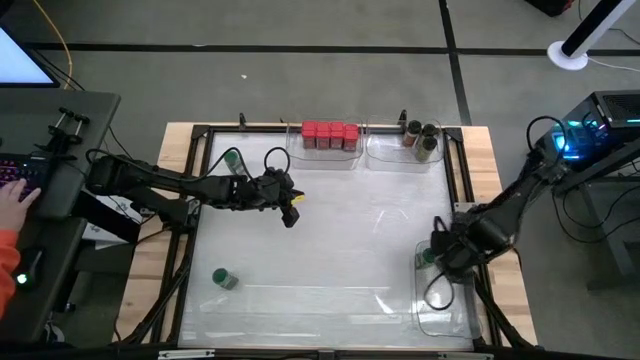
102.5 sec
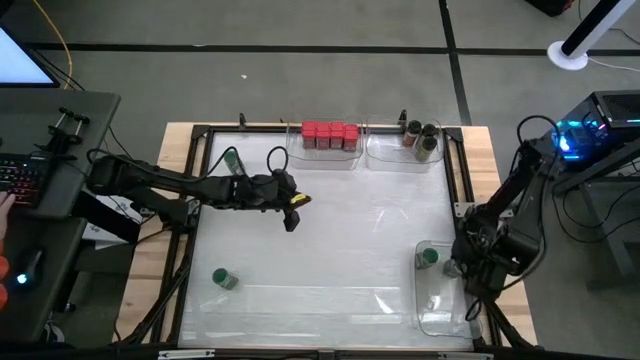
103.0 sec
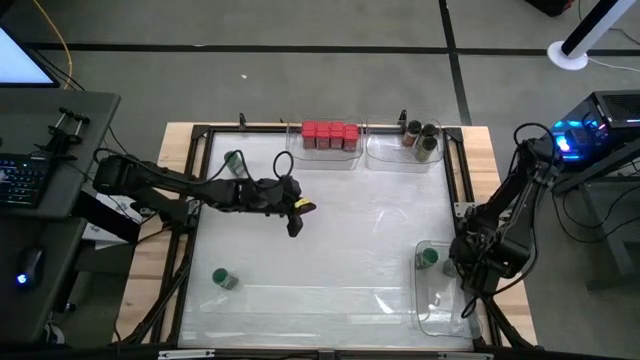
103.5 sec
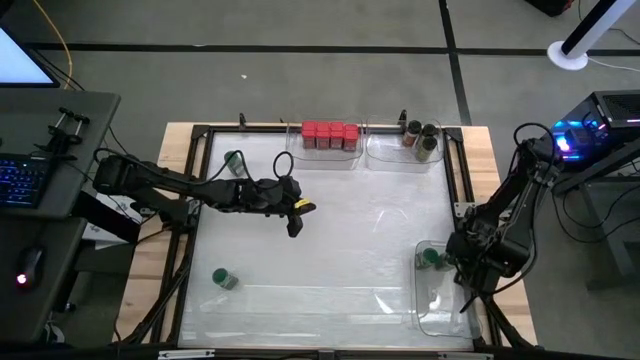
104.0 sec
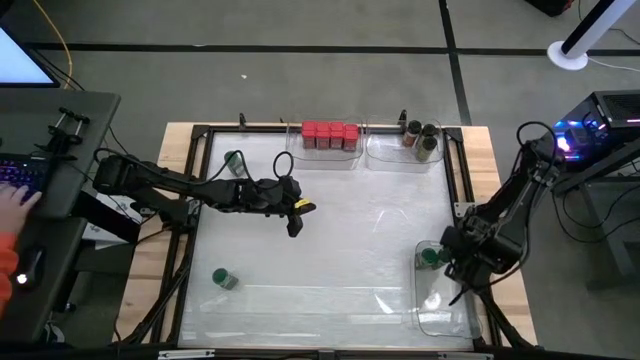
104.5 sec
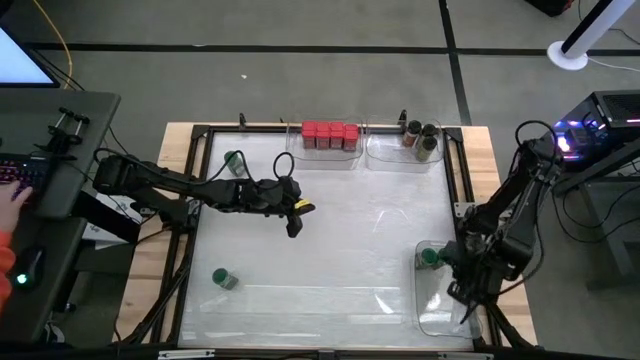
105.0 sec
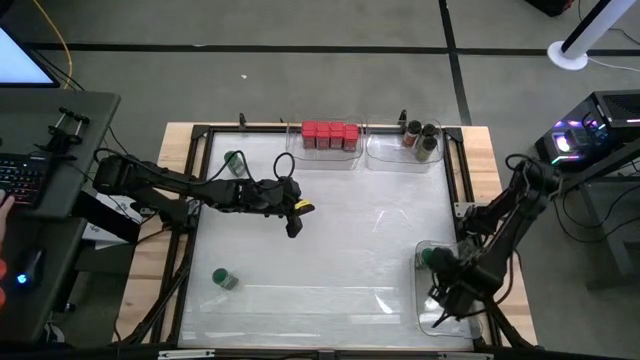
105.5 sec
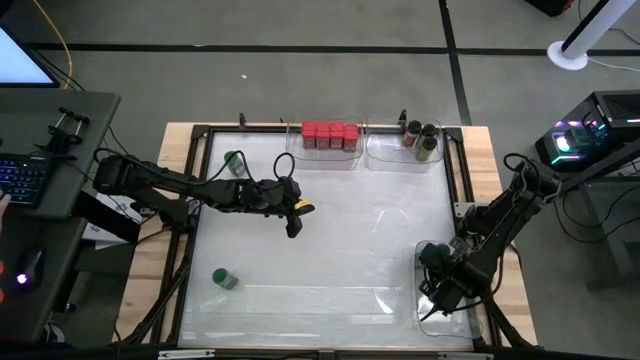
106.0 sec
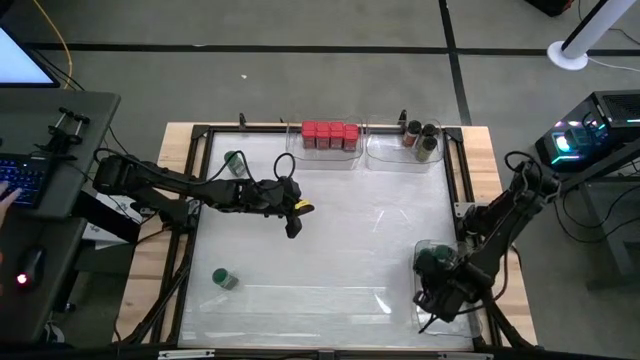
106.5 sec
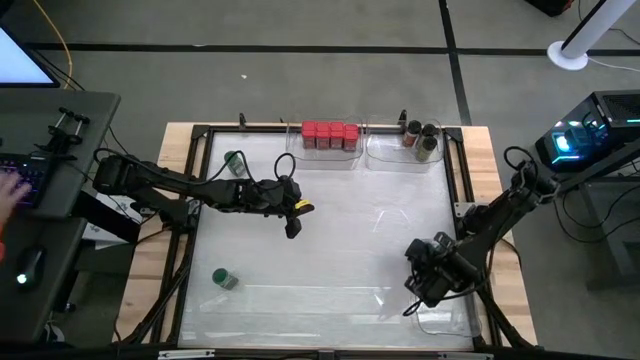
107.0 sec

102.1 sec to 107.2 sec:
Task: Sort spices by type
Adjust the green seasoning bottles inside the bottom transparent bin

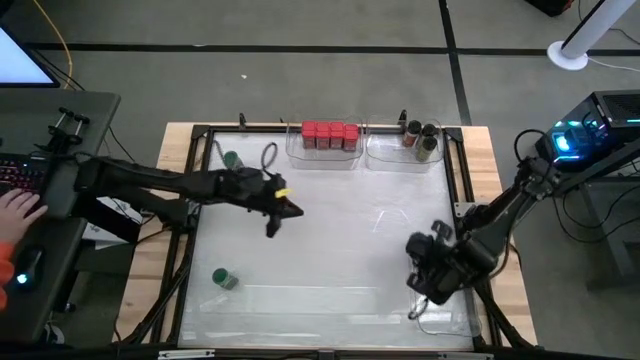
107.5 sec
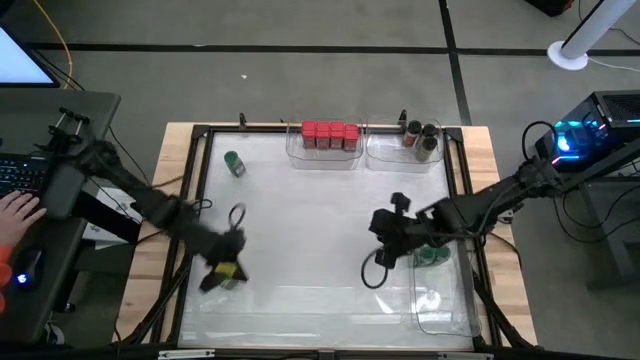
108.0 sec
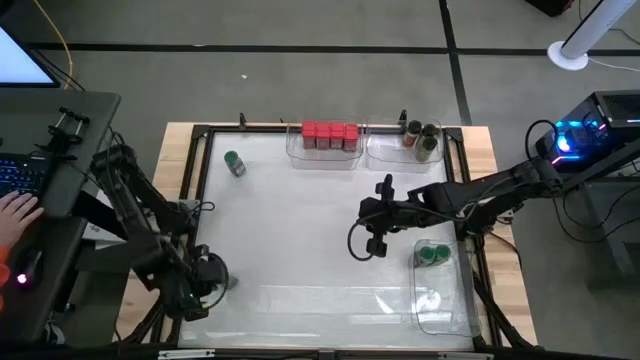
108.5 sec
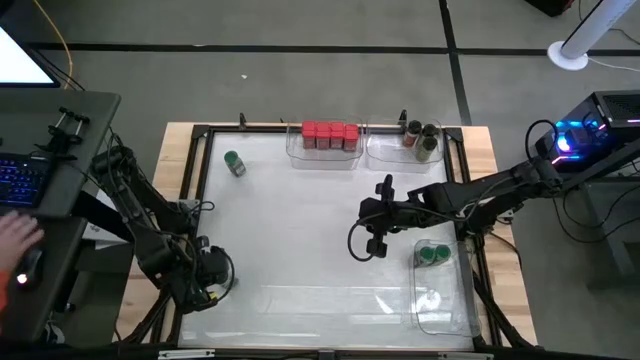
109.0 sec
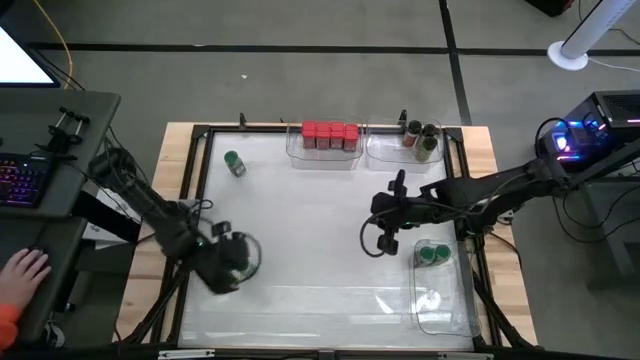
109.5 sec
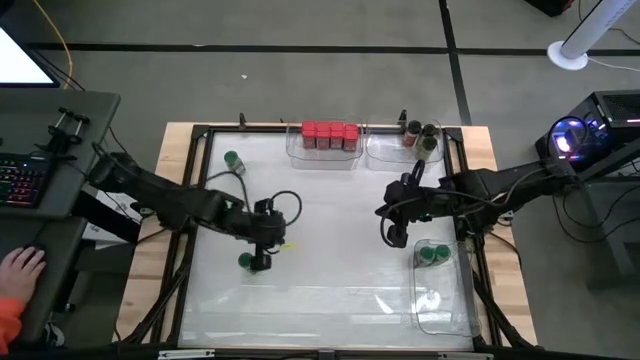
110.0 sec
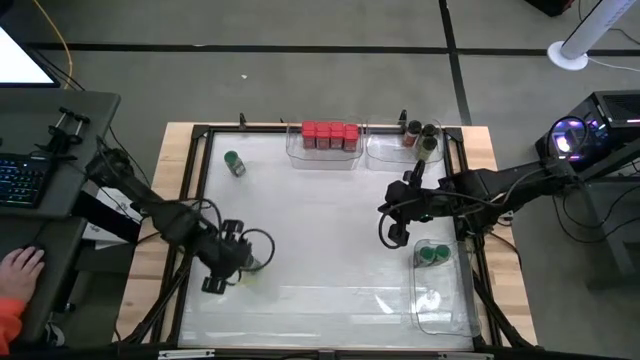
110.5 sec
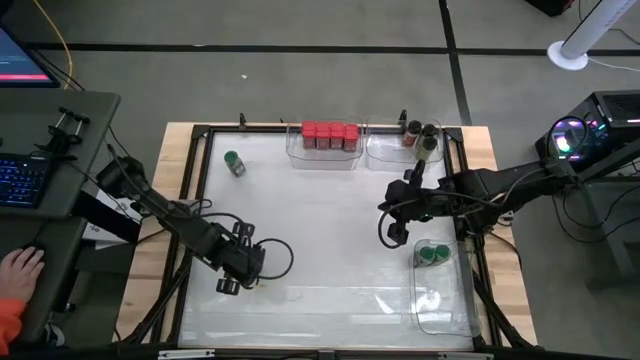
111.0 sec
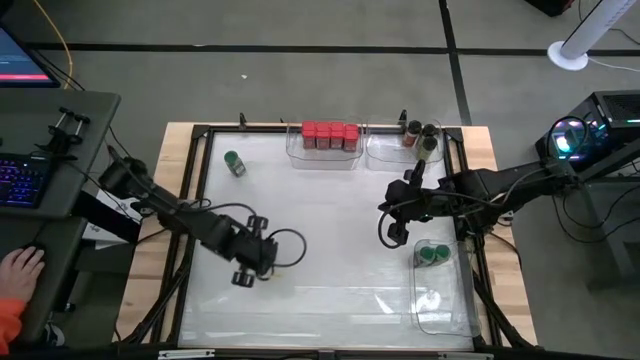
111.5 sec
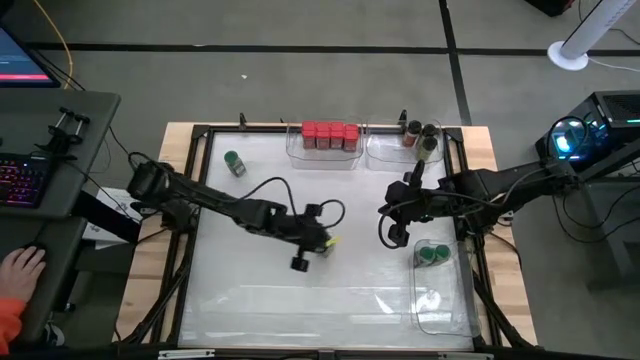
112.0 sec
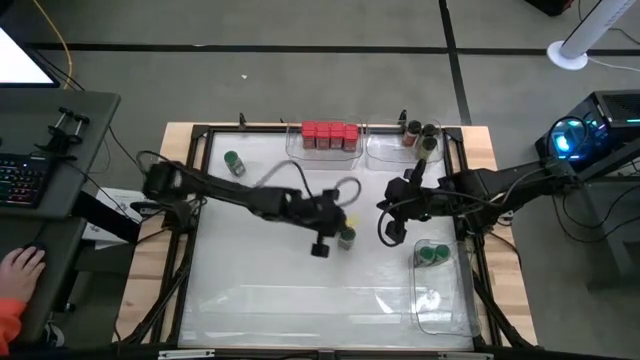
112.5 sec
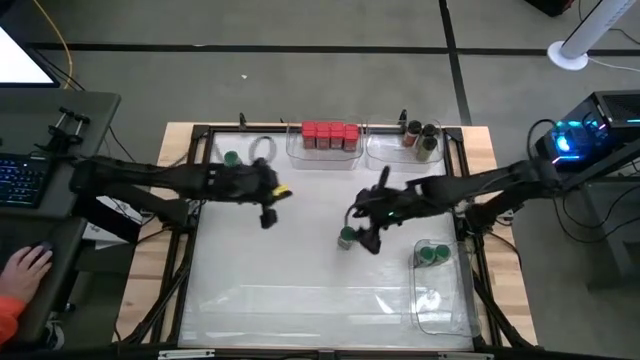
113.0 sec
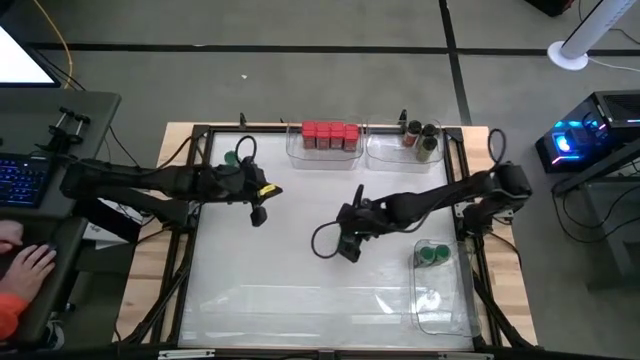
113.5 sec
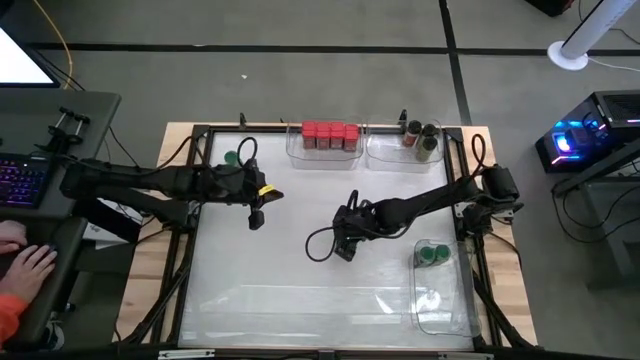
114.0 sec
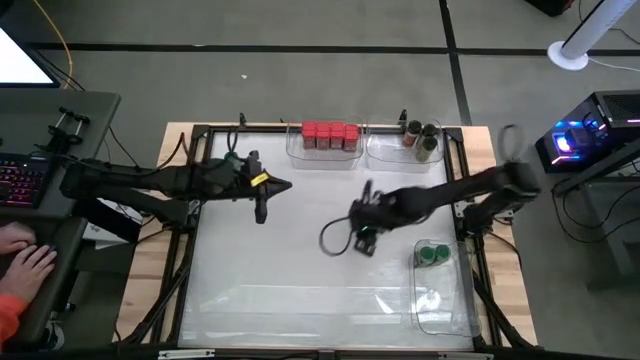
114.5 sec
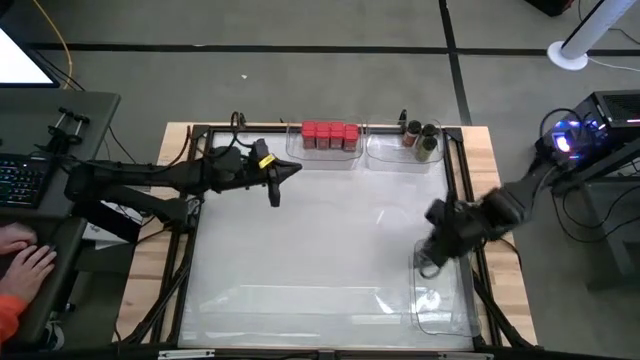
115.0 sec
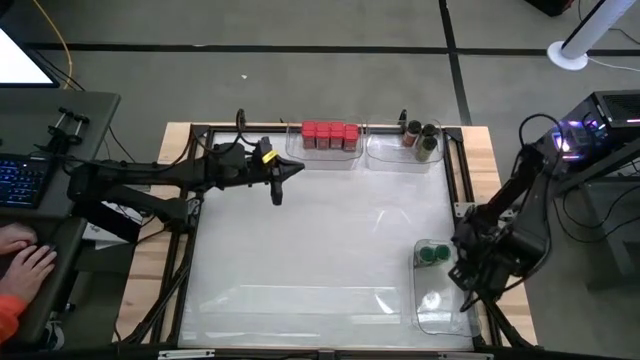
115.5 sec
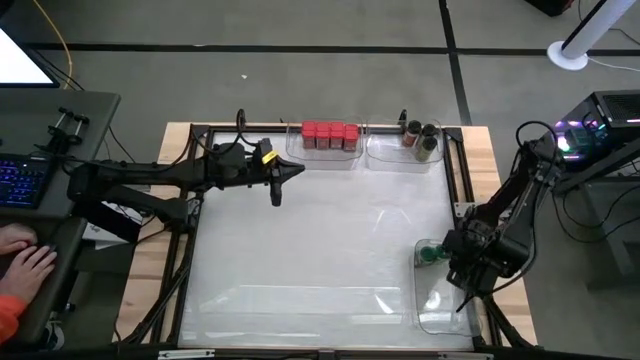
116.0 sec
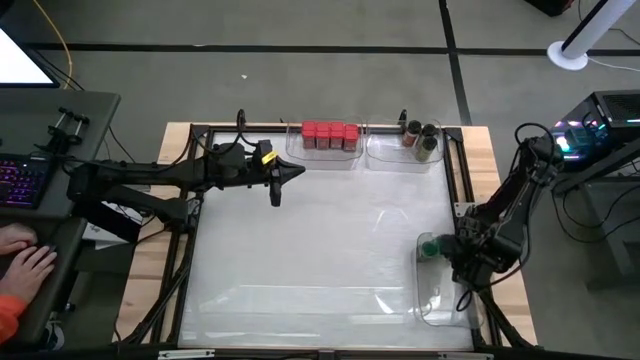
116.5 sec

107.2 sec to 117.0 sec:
Put the green seasoning bottle into the bottom transparent bin

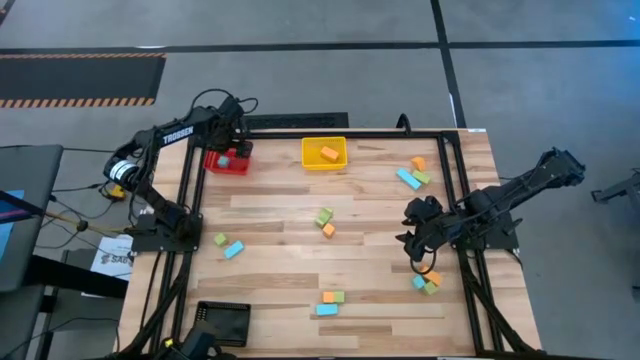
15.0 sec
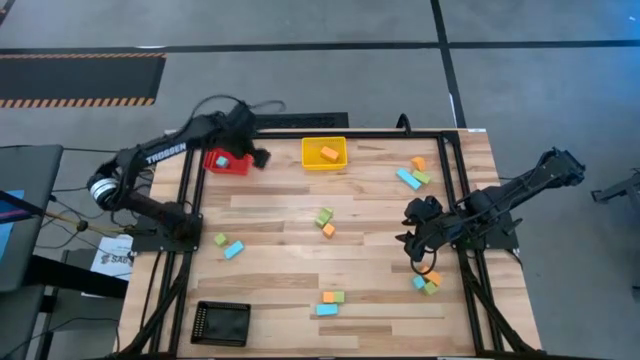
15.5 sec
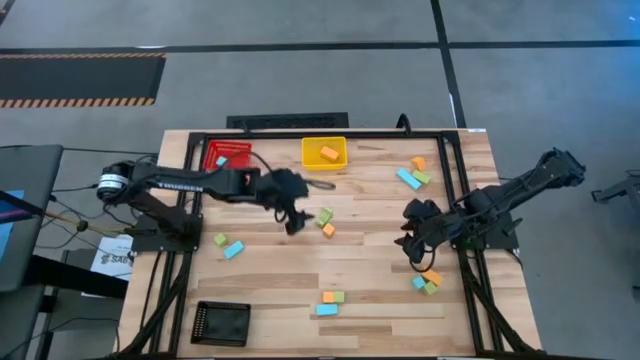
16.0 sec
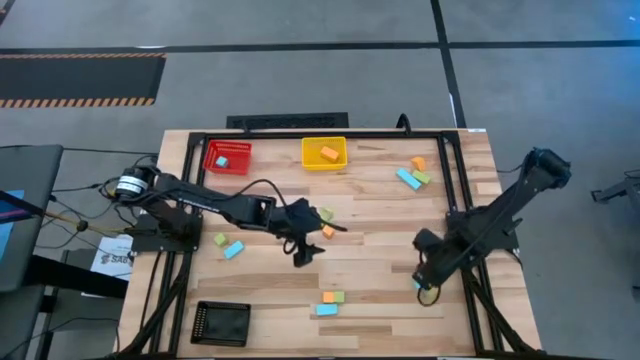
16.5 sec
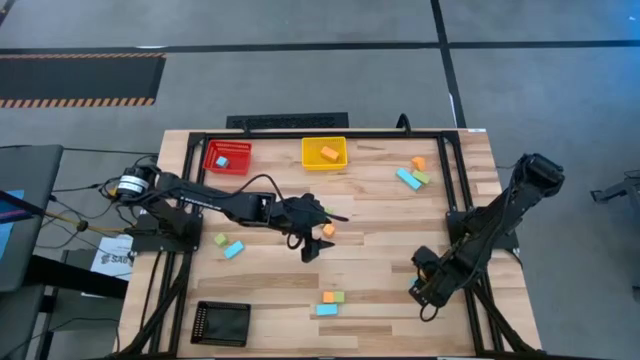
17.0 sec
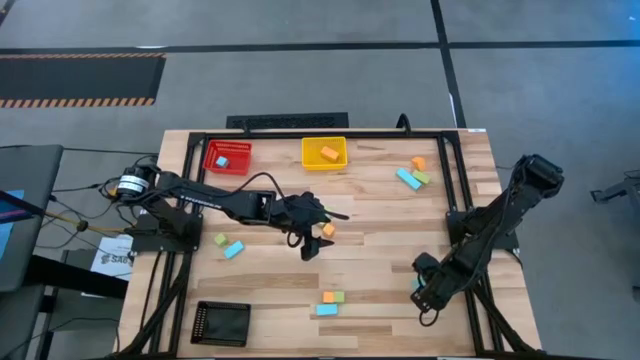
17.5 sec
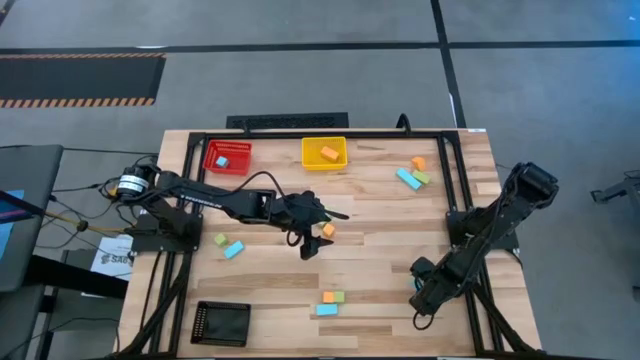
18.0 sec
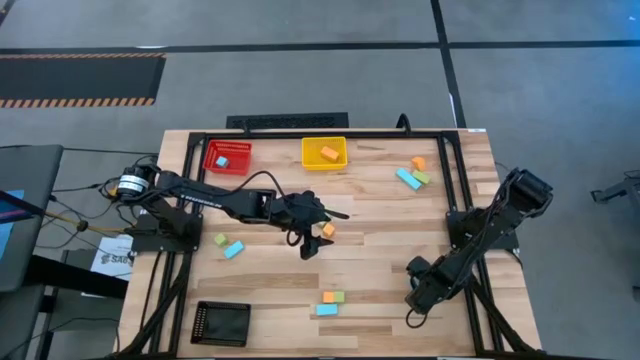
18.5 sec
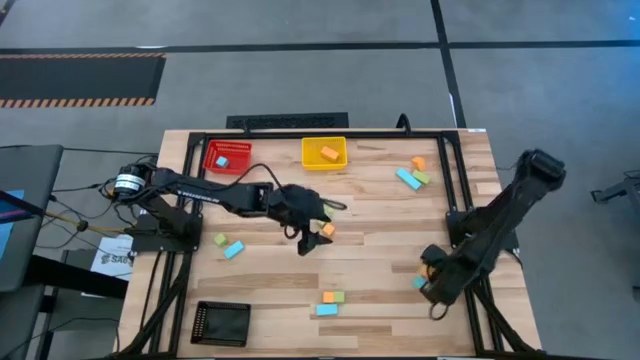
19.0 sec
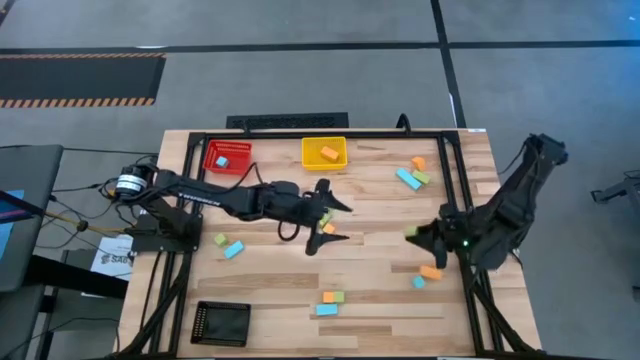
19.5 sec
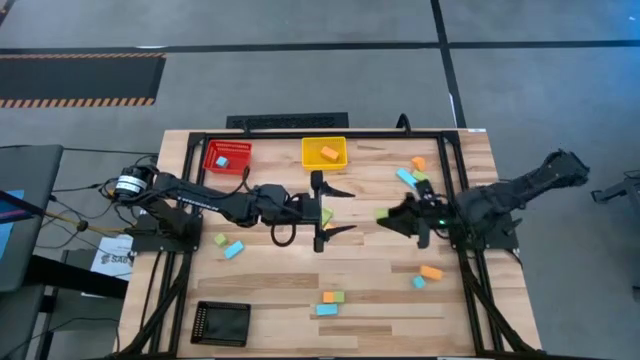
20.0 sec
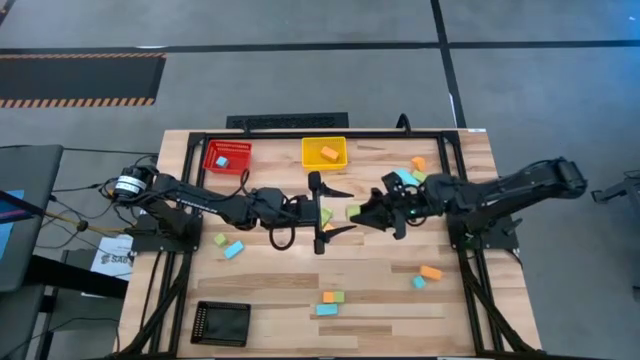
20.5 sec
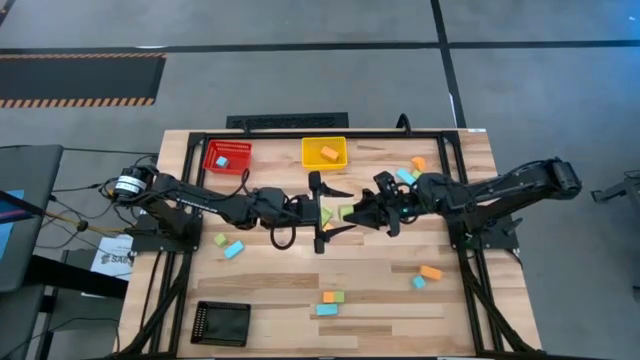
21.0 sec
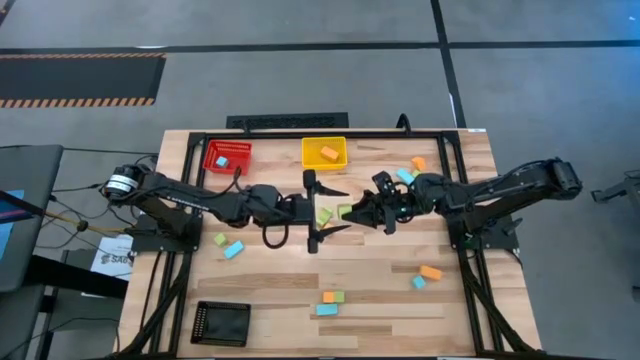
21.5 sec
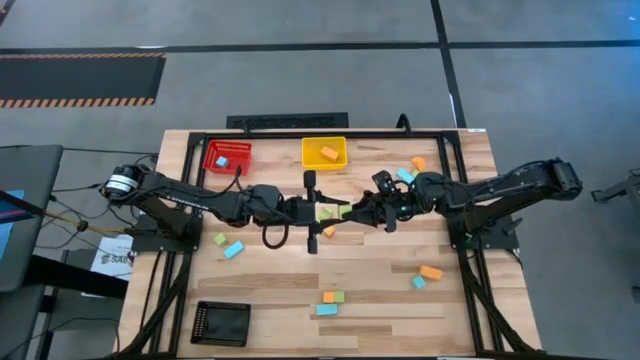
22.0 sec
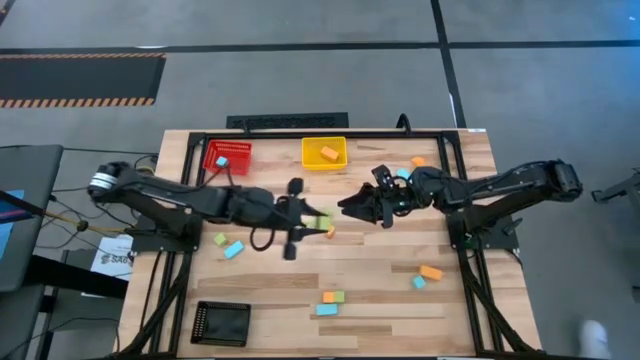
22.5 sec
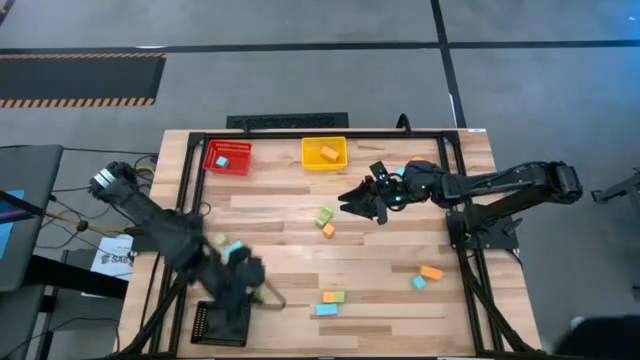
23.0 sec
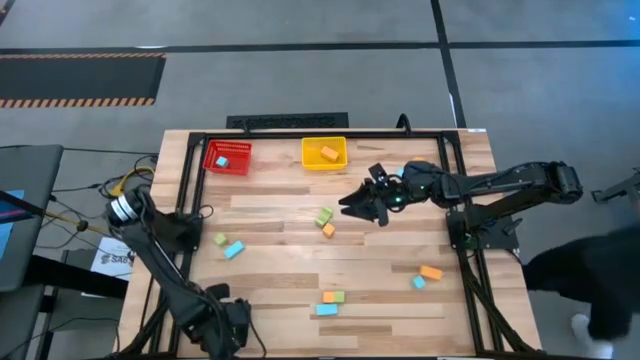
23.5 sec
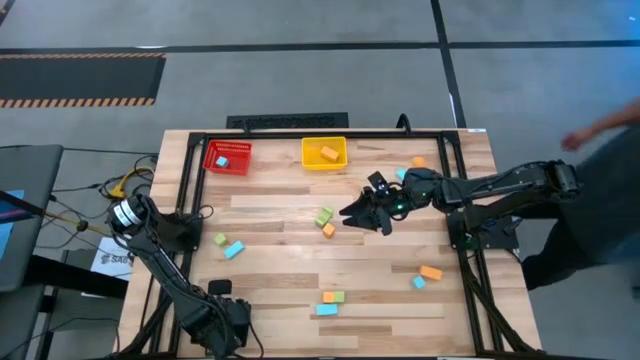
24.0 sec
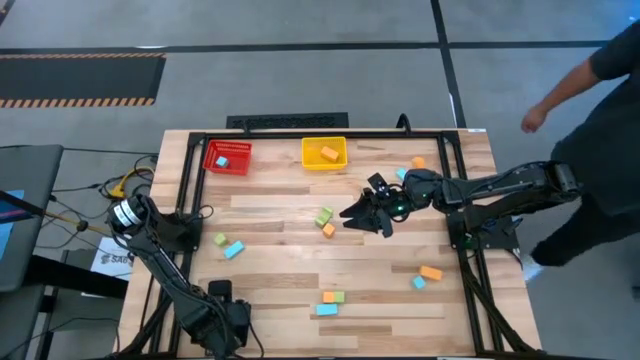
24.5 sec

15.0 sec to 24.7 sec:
Task: Sort & place blocks by color
Put the wooden green block into the black bin
